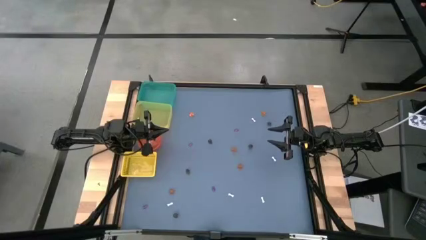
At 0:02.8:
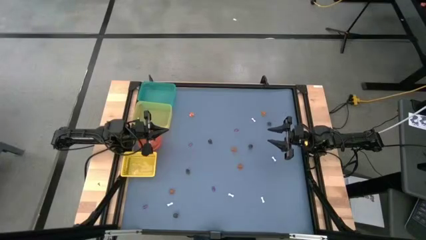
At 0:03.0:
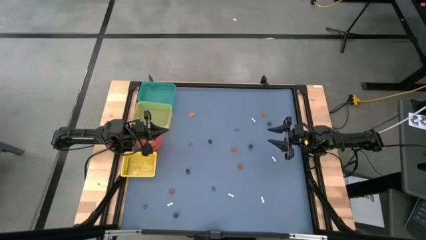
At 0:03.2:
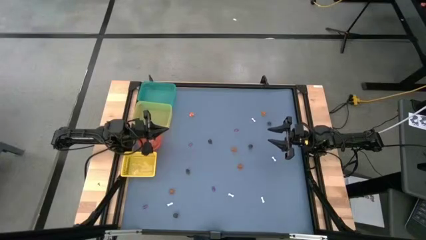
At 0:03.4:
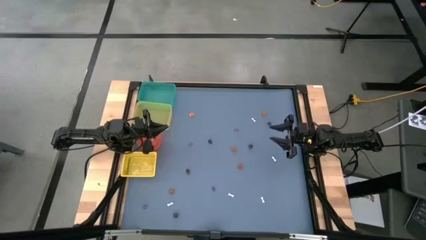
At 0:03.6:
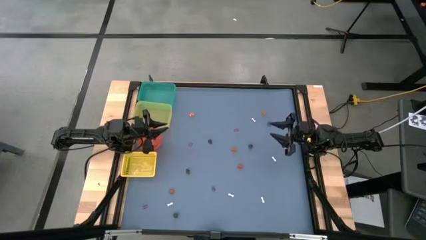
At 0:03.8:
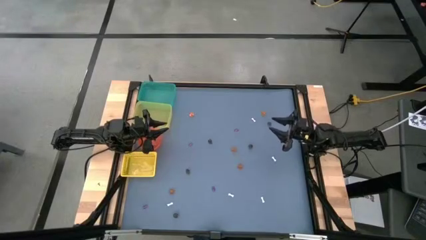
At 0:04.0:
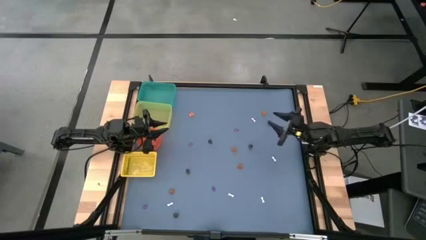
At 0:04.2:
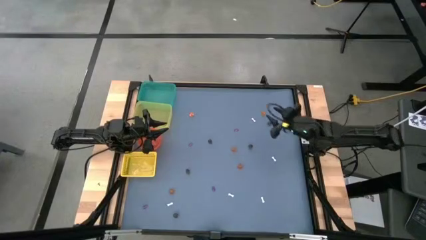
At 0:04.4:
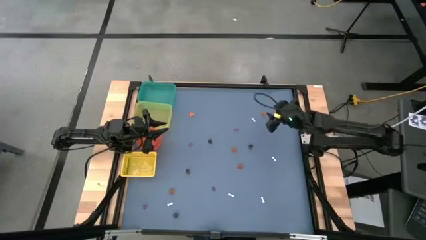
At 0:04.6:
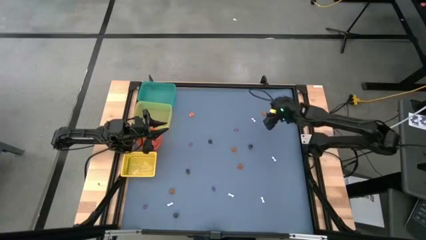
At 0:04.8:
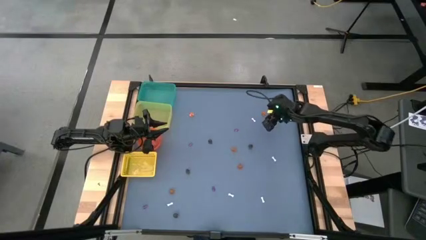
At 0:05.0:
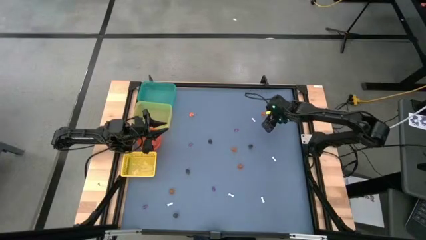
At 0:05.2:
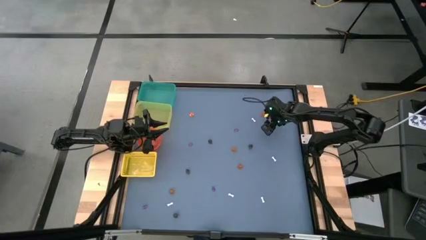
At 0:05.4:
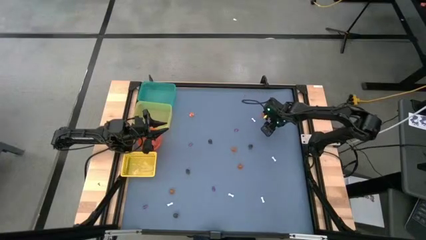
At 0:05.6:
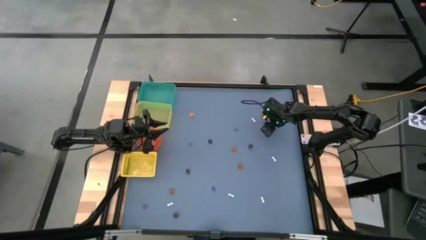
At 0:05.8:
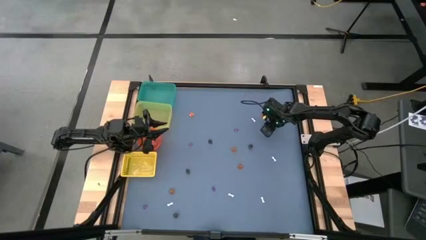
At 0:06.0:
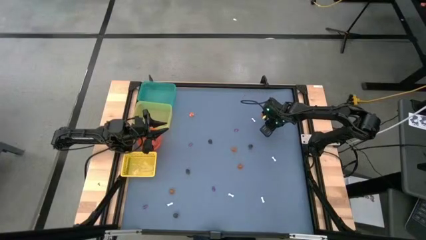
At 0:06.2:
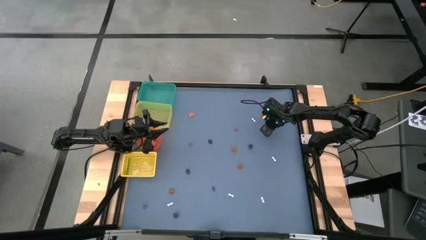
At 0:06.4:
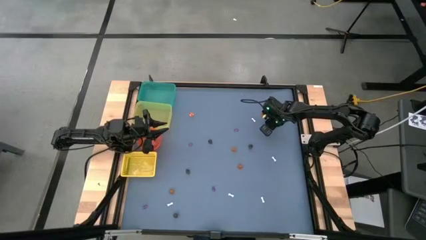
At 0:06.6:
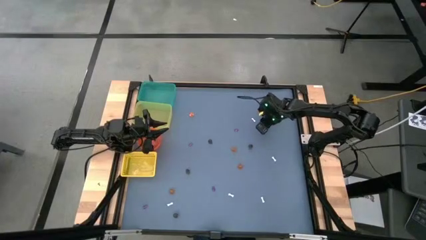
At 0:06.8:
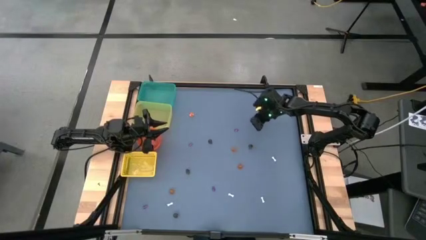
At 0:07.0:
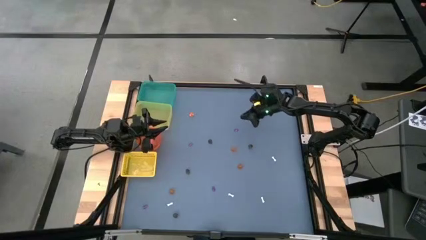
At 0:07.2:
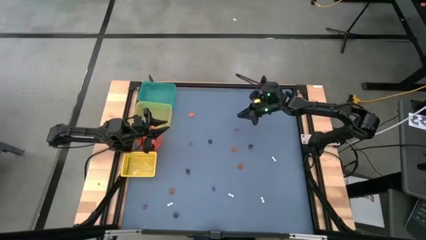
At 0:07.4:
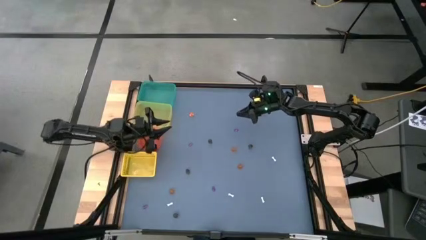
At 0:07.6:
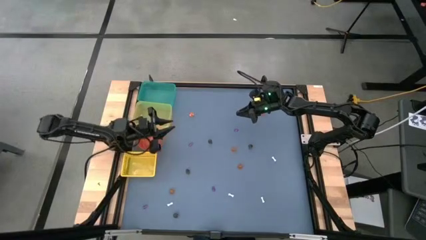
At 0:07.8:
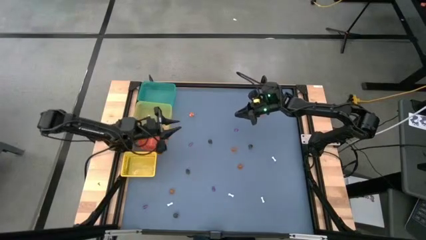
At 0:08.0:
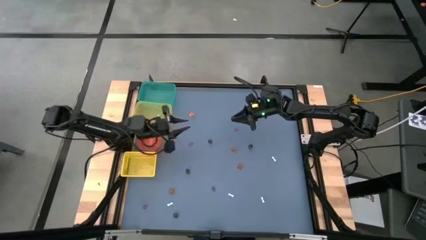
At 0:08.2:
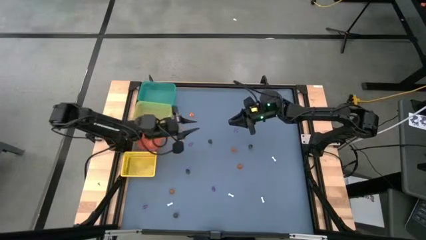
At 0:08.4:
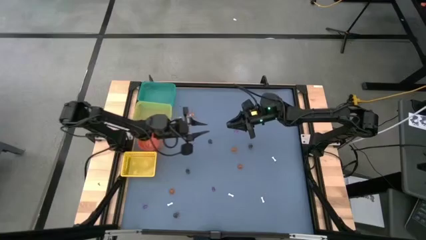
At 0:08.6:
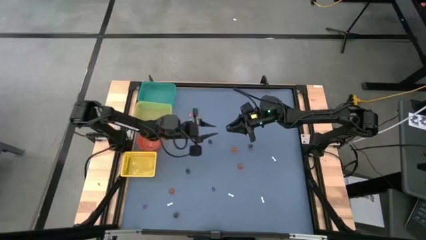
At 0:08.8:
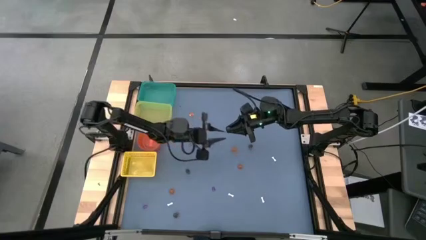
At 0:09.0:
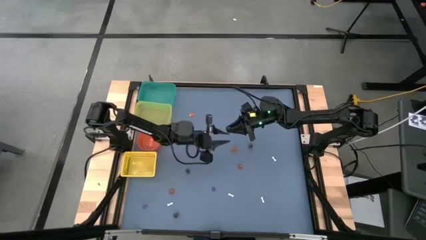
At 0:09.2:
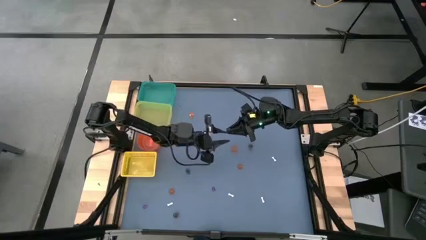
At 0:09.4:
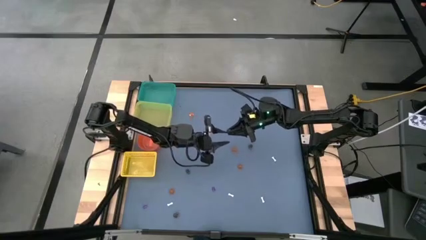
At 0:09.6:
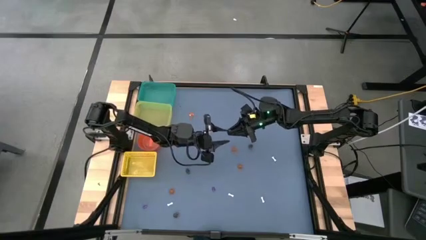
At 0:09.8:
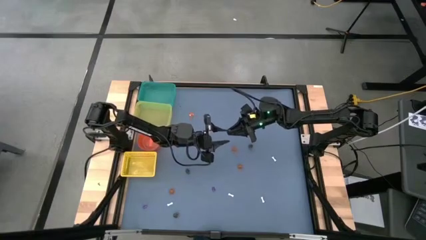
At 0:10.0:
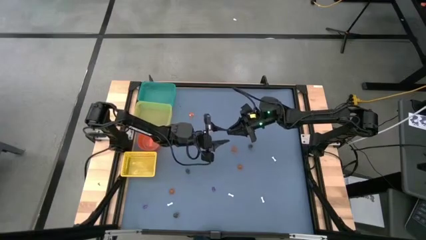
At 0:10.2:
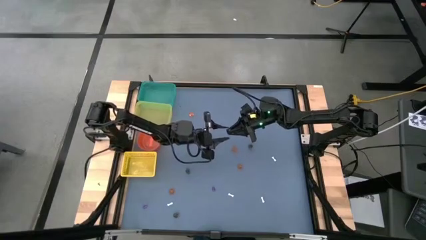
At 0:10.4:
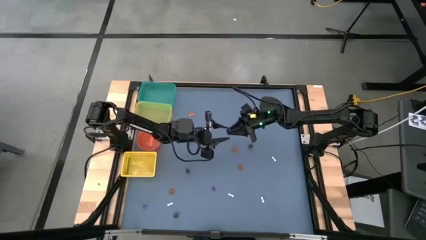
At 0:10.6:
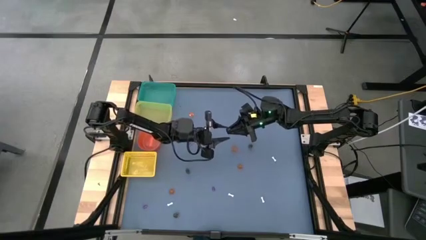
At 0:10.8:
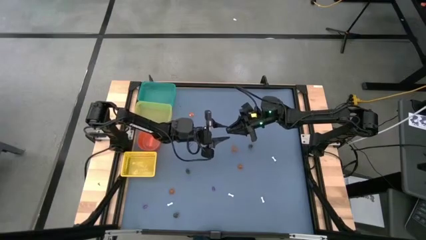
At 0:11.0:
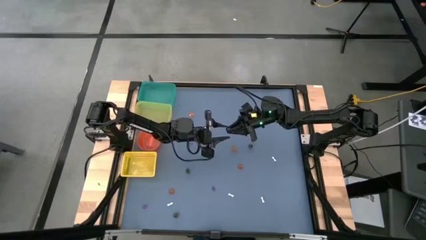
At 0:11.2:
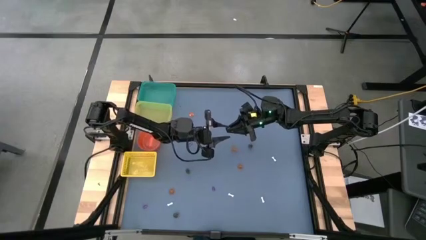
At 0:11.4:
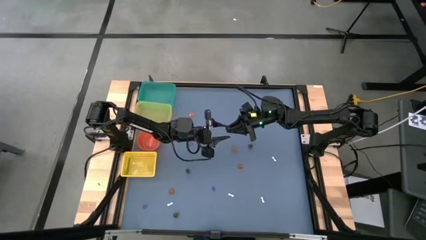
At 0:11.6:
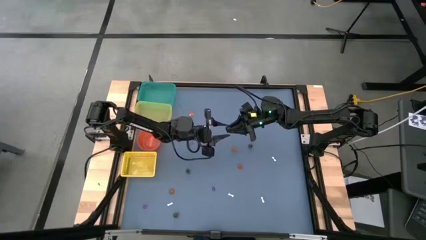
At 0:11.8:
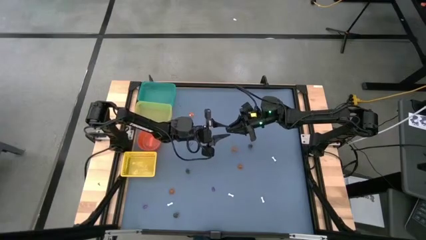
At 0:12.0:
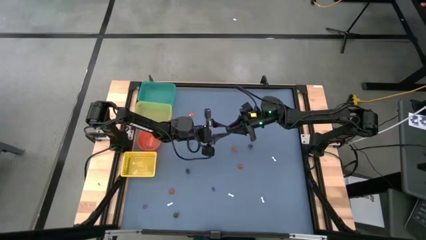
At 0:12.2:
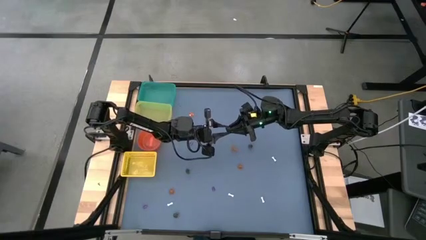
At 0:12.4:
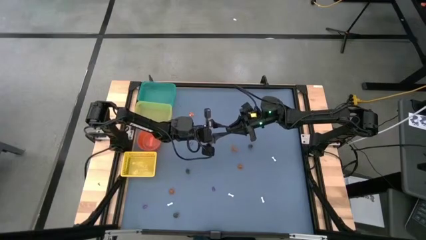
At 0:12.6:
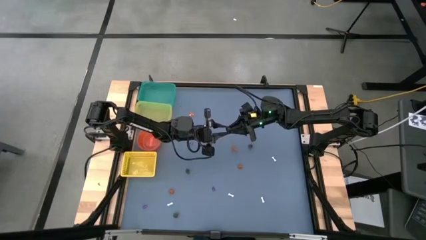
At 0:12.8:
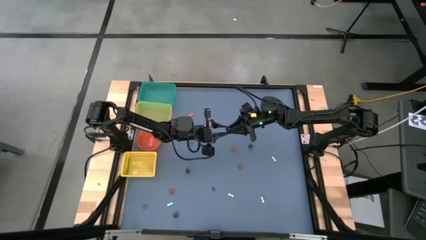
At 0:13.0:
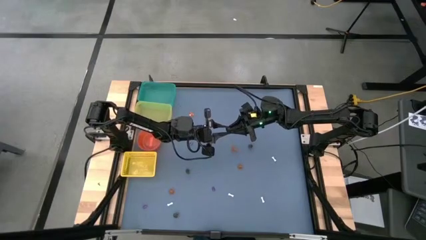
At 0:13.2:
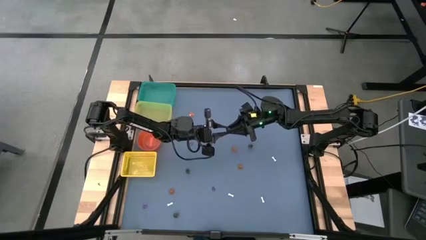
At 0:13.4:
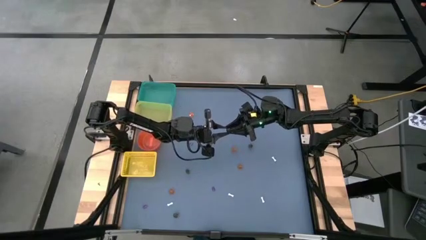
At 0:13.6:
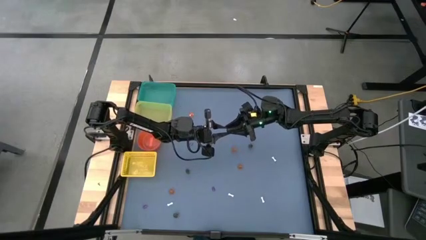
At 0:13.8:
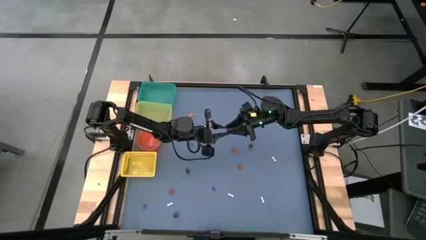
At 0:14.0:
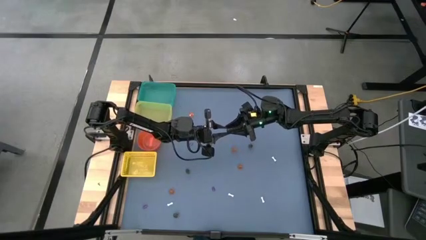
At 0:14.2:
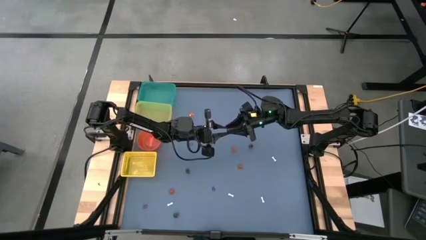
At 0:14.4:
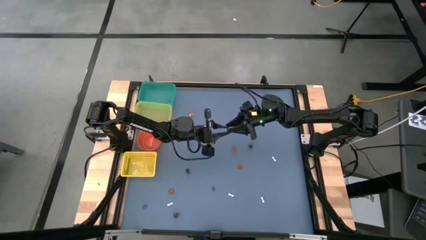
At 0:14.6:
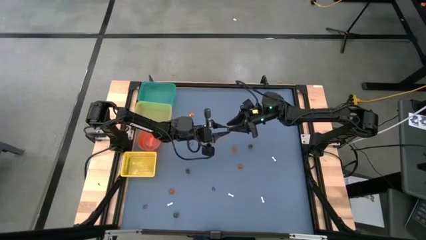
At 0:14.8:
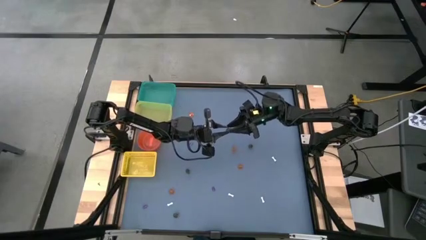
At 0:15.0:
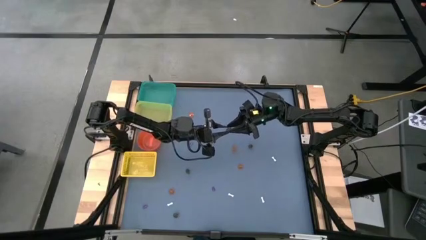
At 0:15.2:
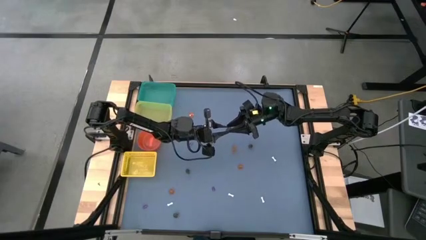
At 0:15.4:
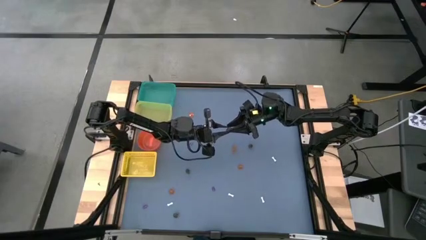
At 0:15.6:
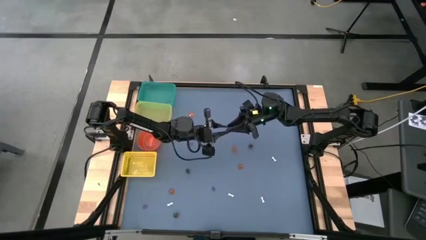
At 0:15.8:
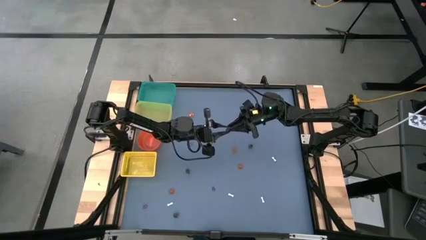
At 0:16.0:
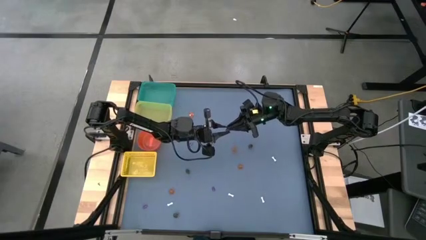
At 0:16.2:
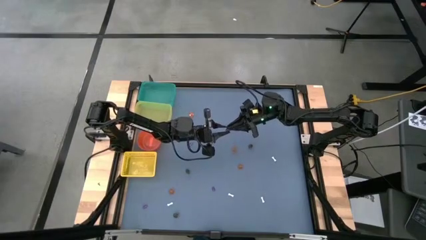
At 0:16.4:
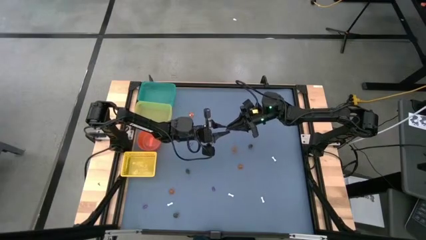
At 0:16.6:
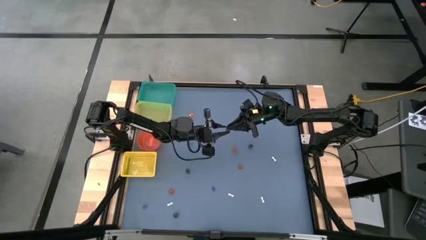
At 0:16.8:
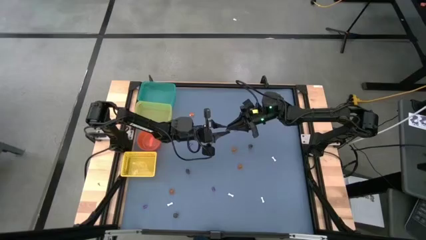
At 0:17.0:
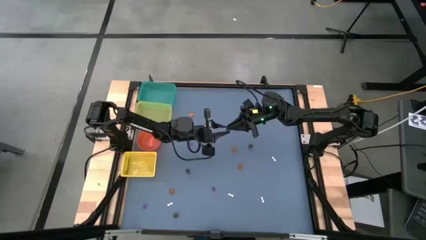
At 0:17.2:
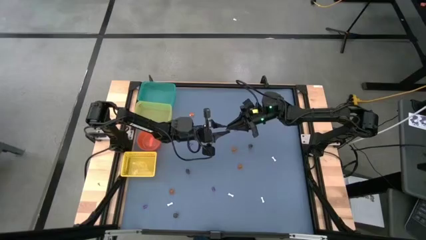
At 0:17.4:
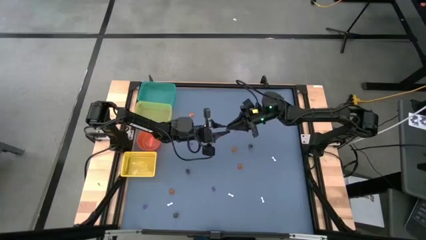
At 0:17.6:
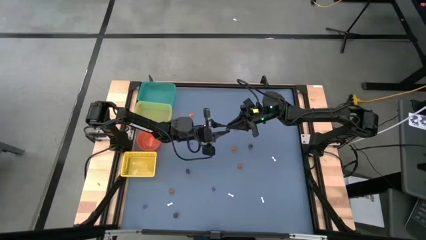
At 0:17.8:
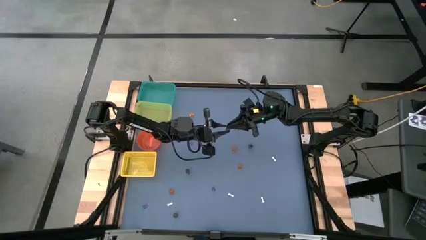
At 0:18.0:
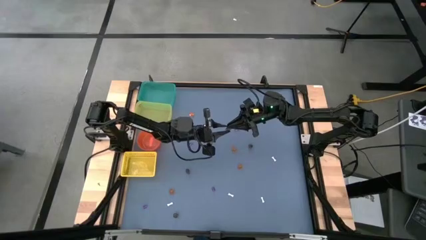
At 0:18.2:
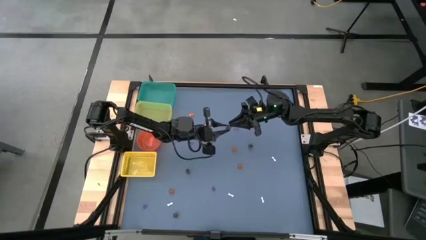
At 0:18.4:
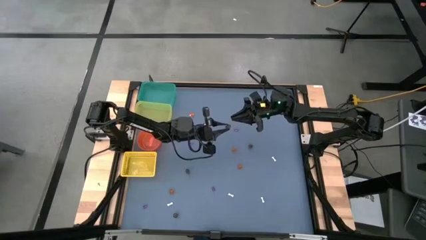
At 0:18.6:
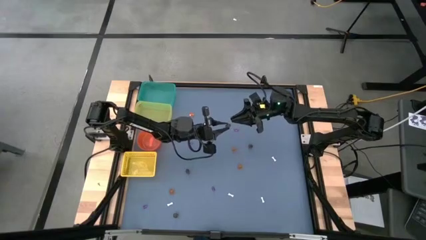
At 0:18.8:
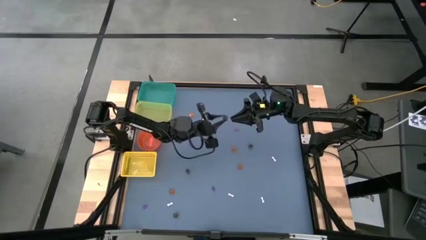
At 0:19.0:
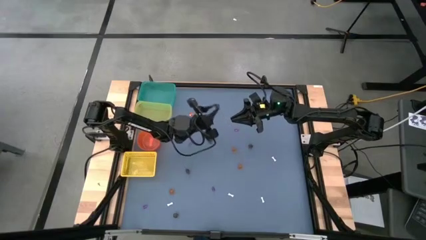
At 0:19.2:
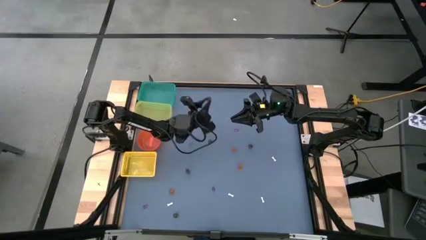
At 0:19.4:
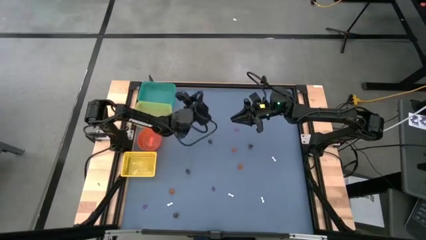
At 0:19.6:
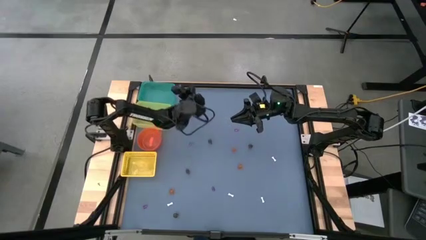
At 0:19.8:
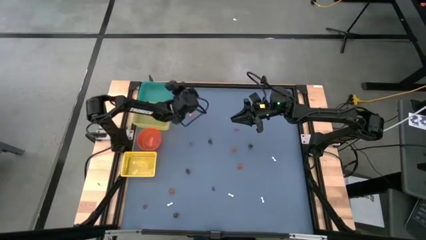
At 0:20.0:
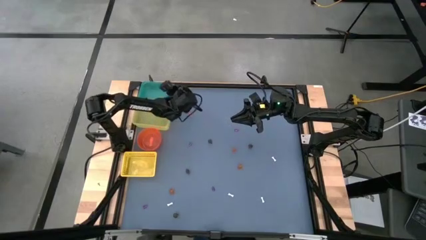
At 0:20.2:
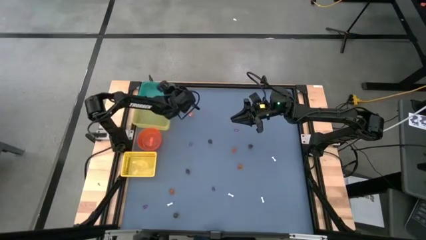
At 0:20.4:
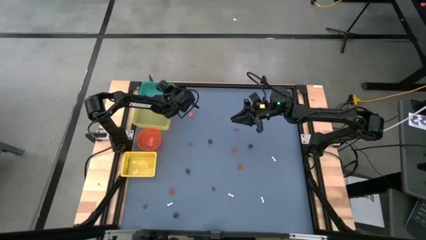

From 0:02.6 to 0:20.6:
Task: Sort Halloween decoration
Put the top right black skull toy into the green bin
